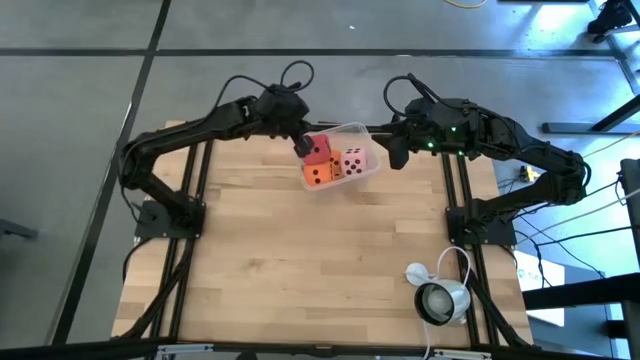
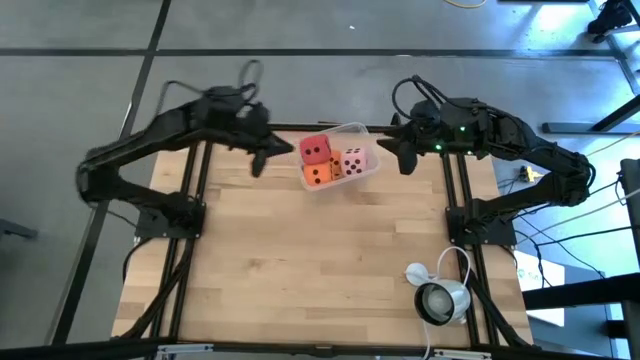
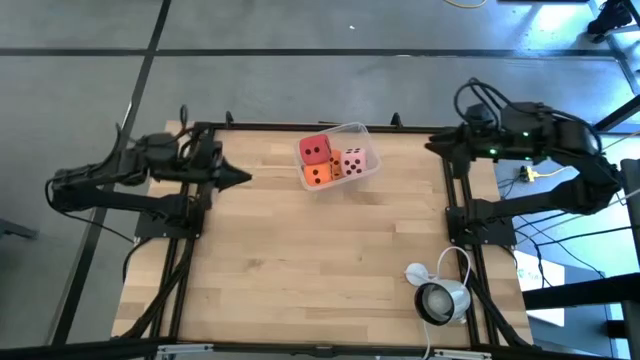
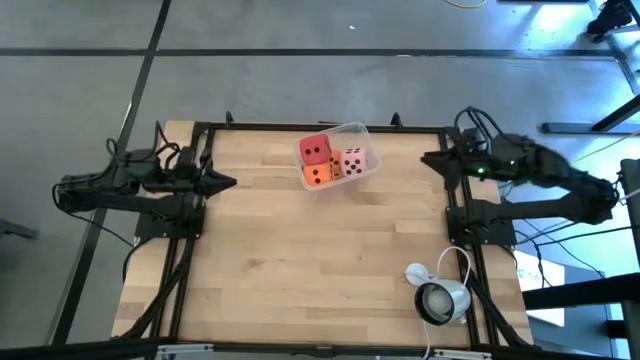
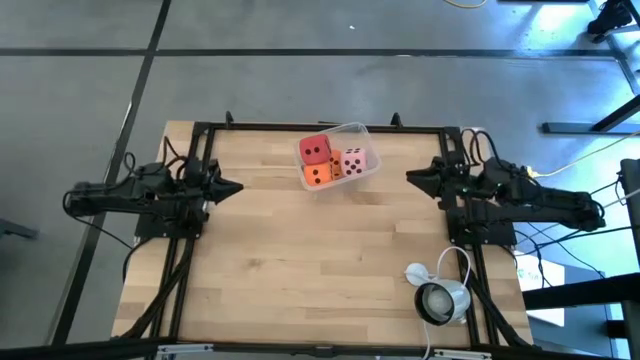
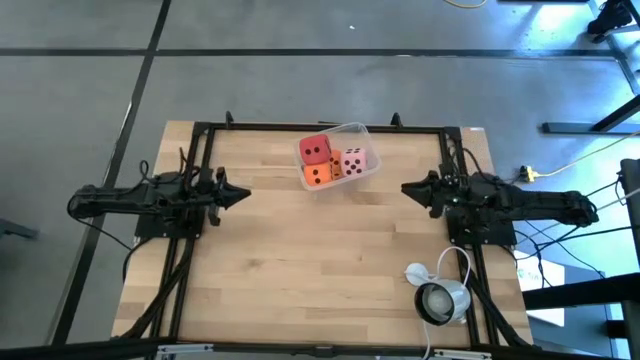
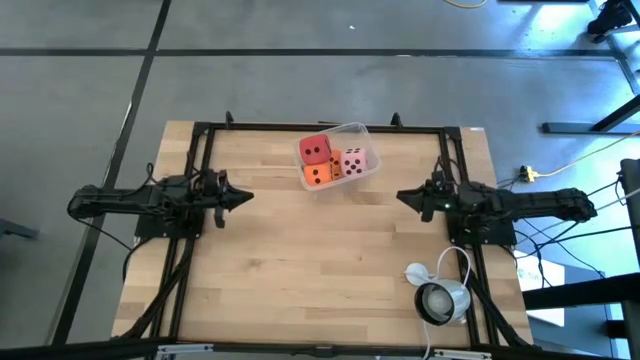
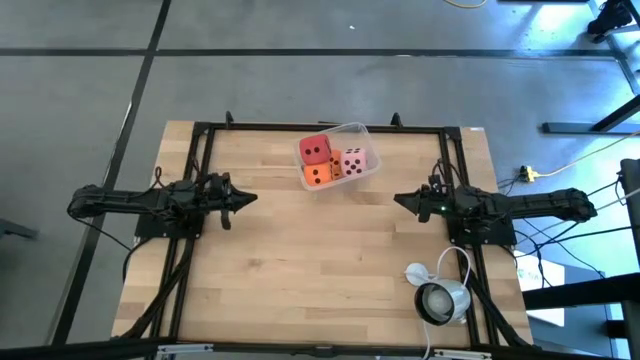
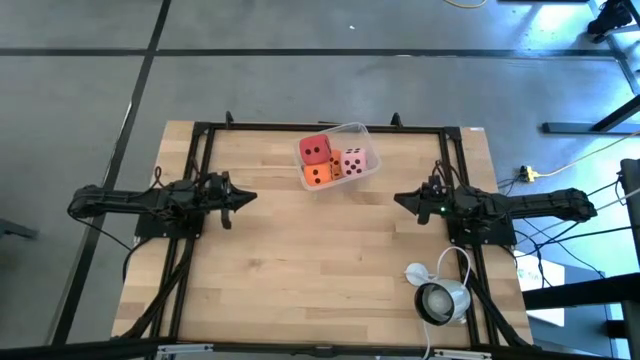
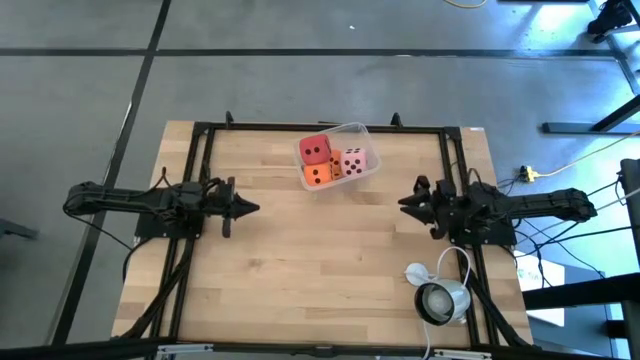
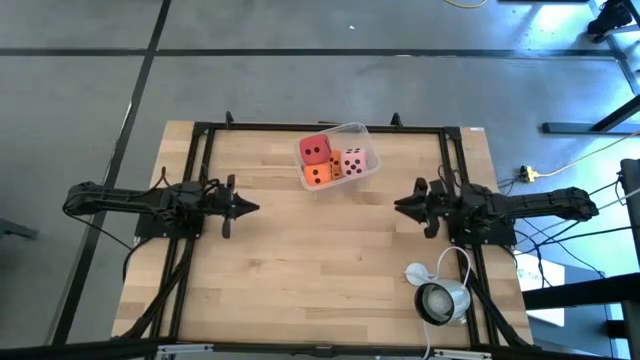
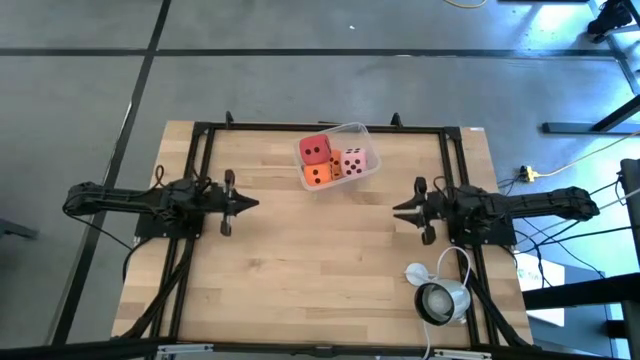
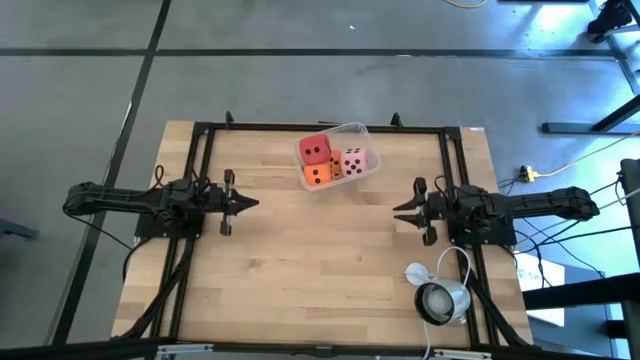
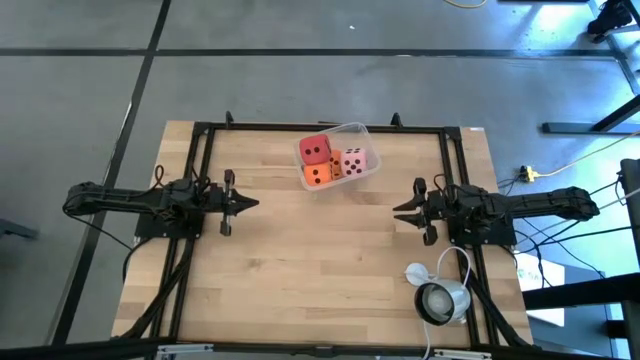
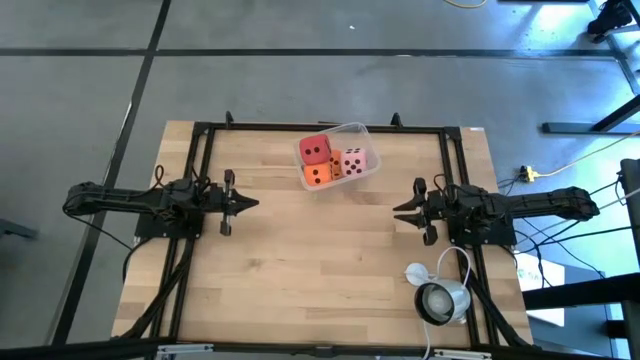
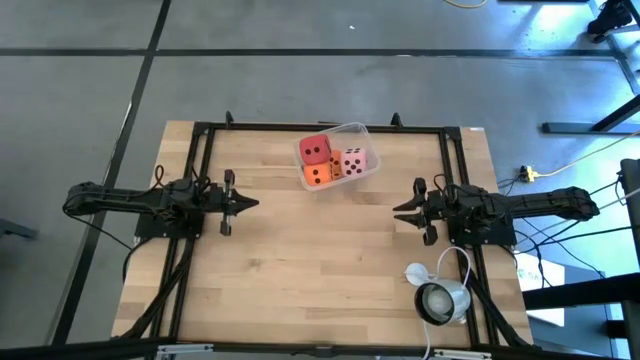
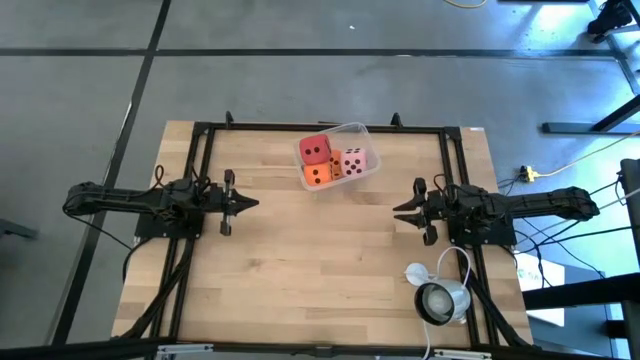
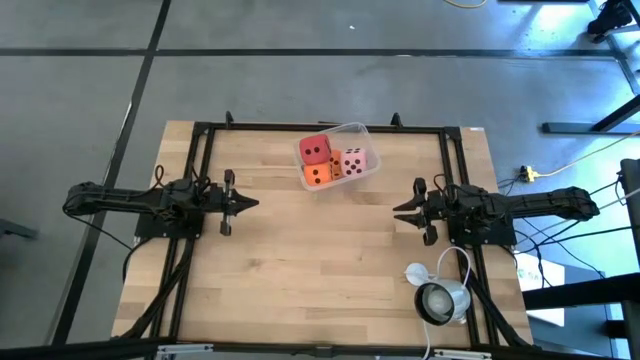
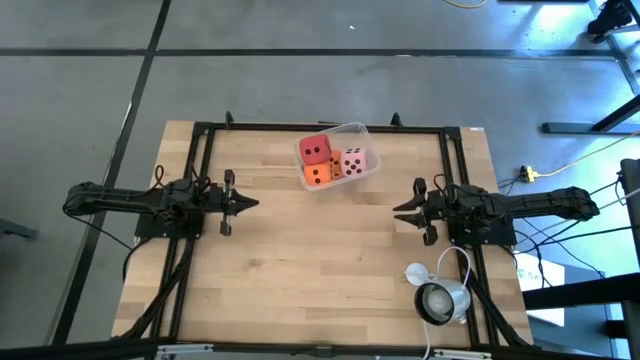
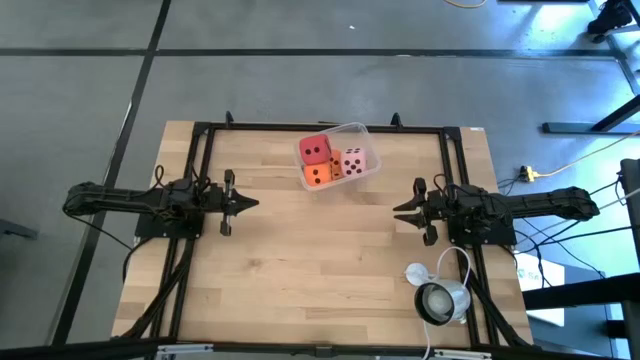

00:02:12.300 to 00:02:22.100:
Task: Pick & Place Dice
Return to Home Position

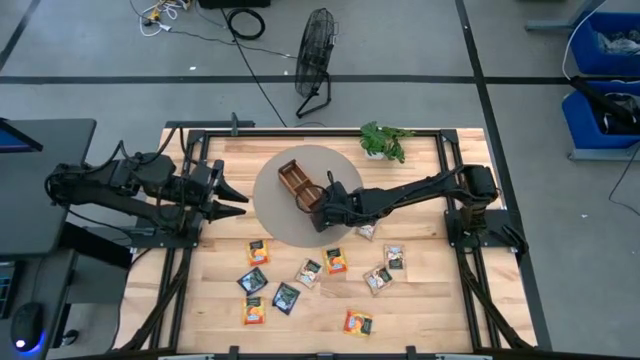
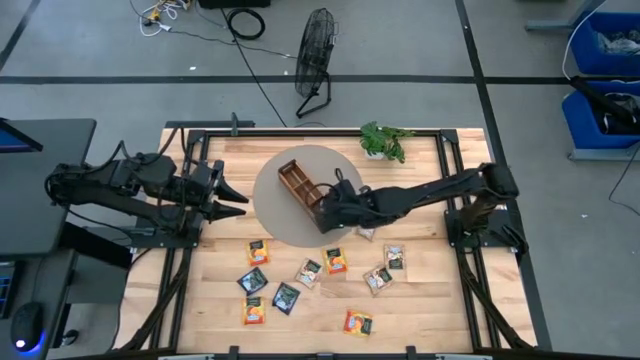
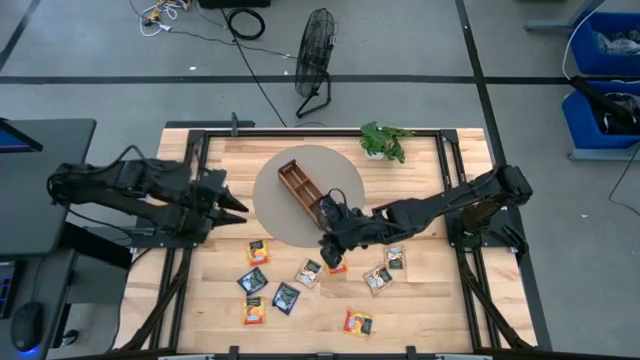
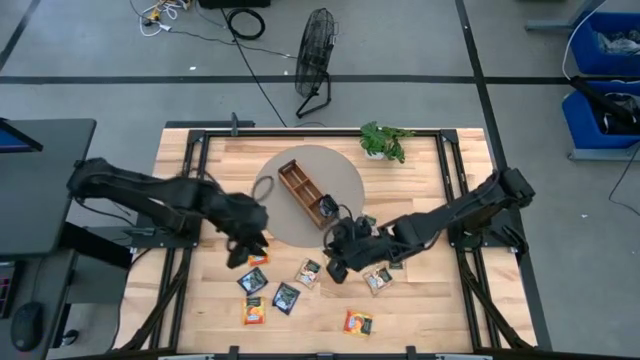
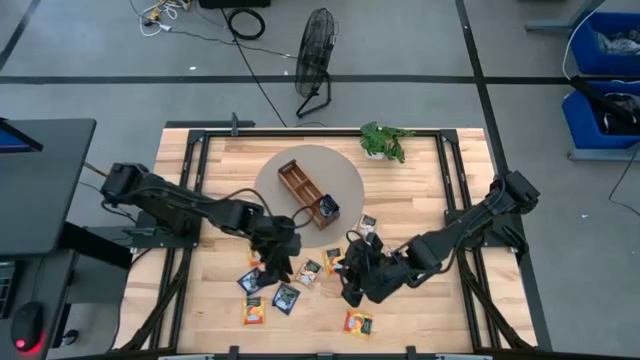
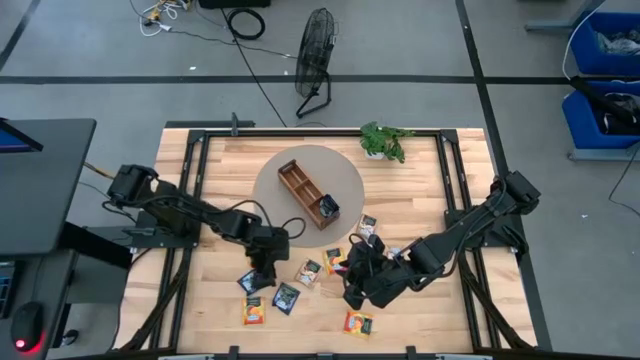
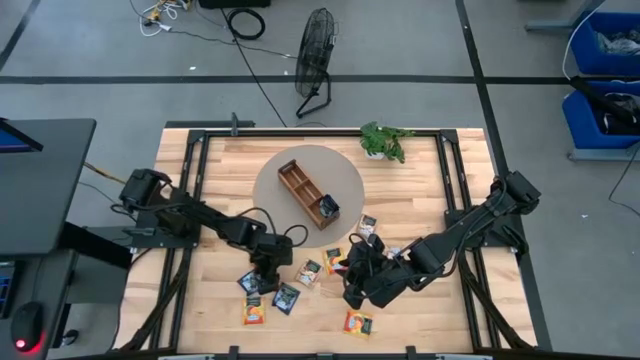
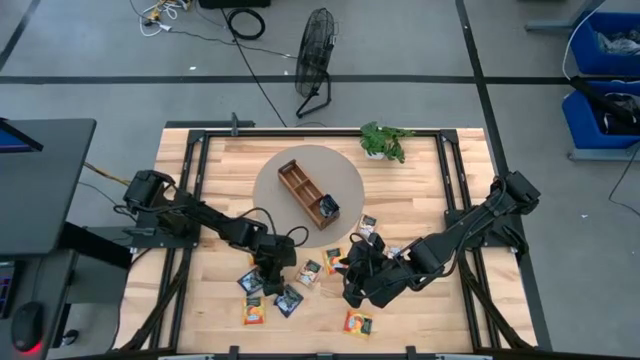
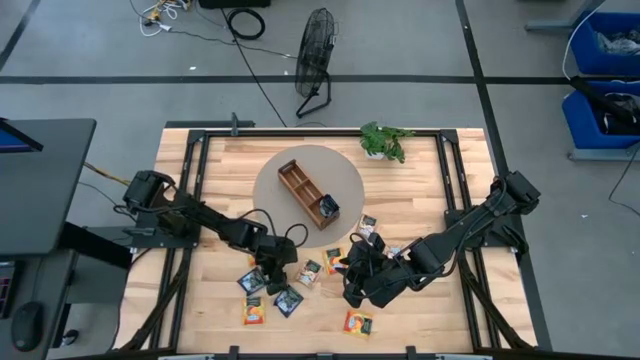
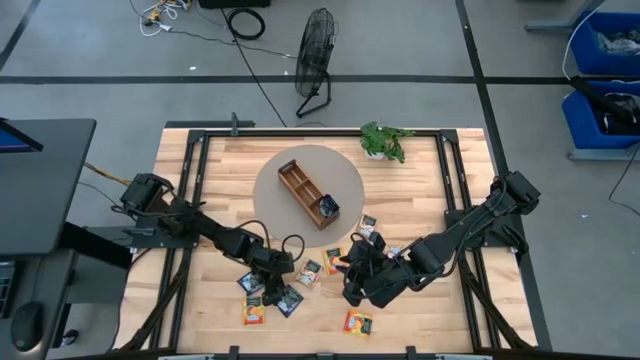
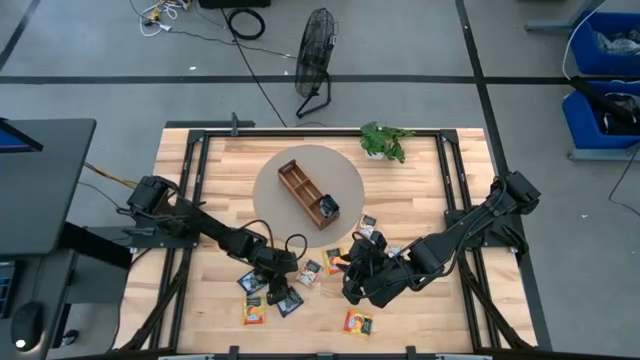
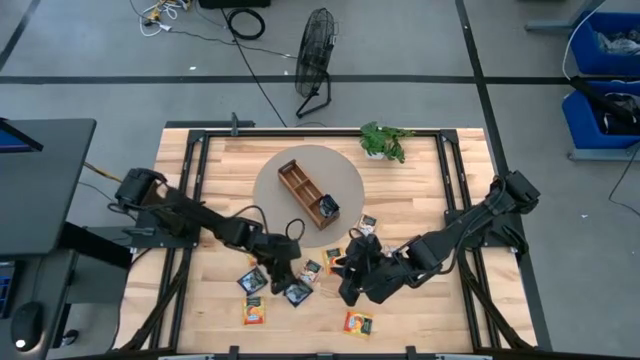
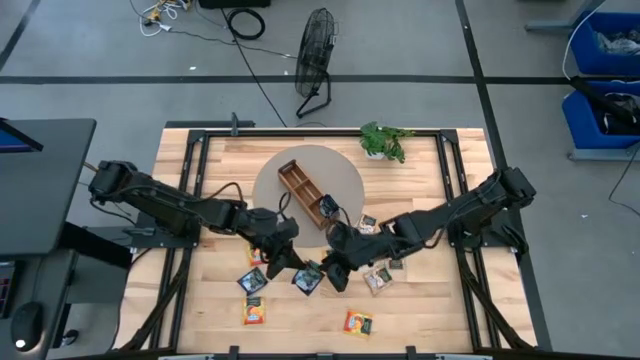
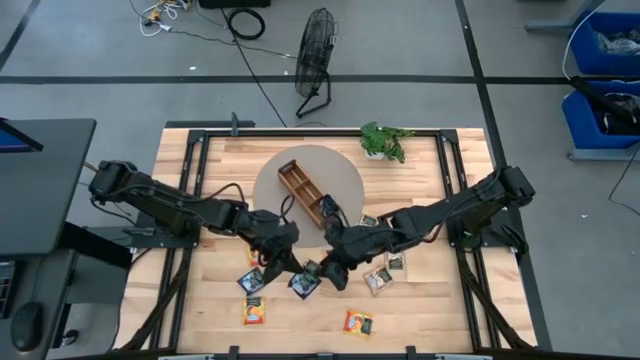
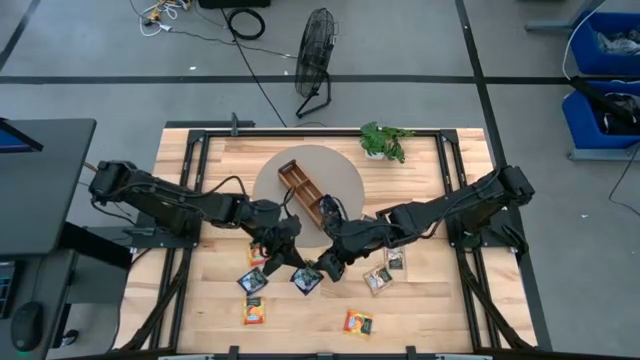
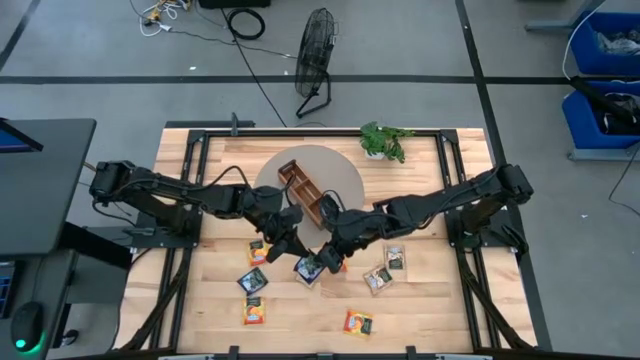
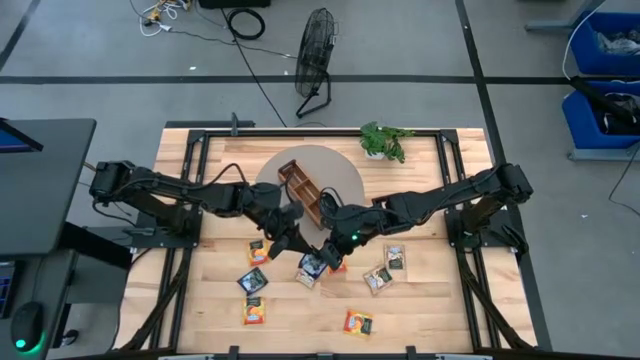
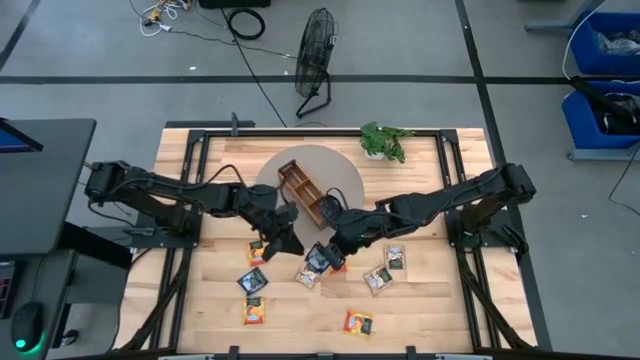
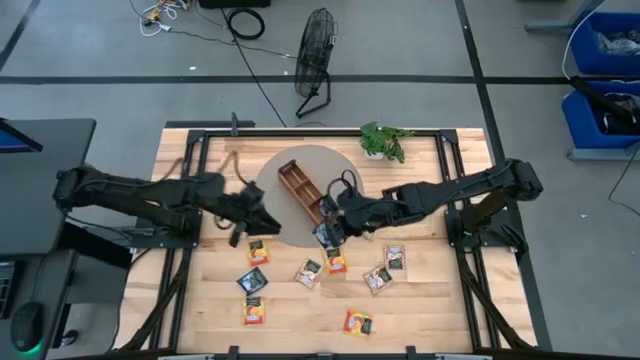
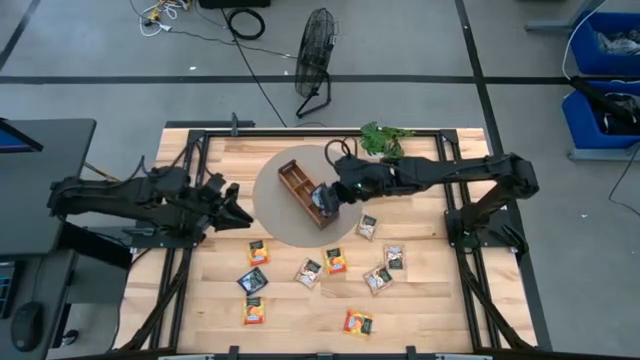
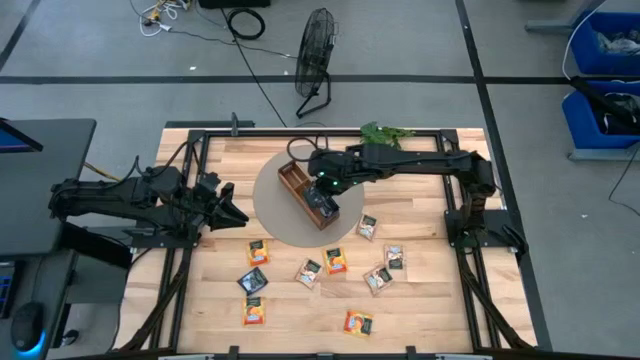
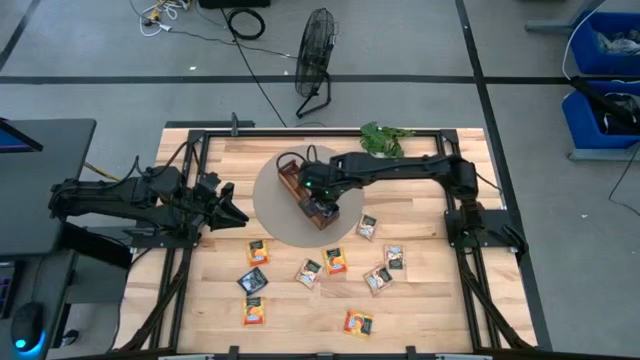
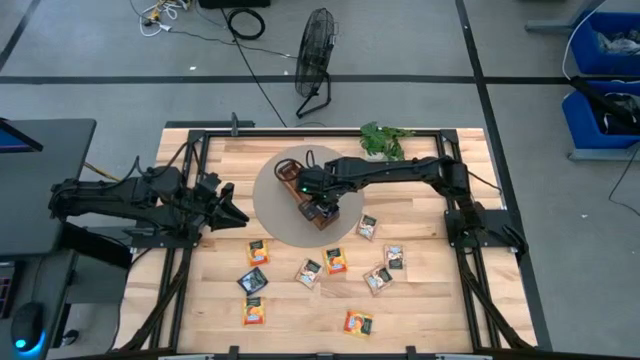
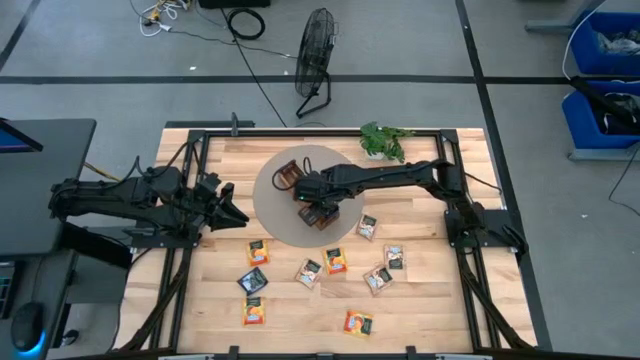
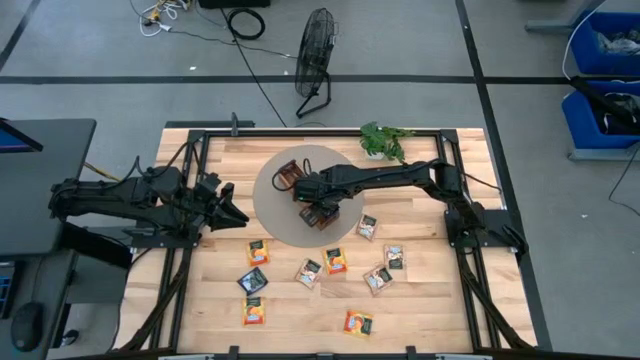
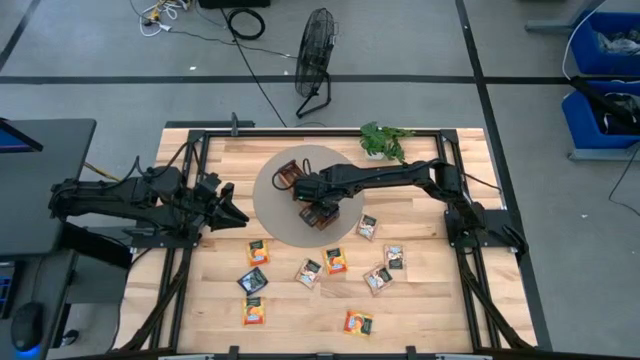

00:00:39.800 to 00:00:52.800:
Task: Pick & Place Tea
Put the purple tea bag into the right section of the wooden organizer
